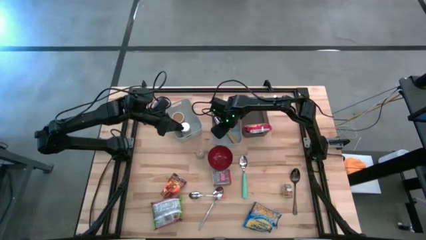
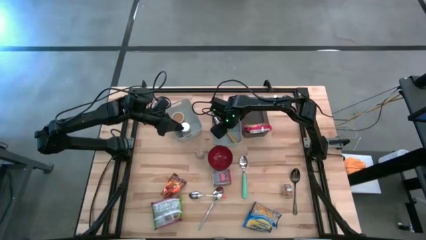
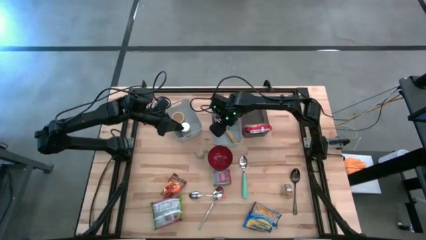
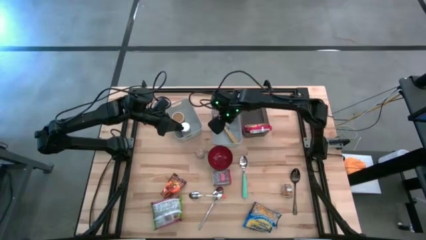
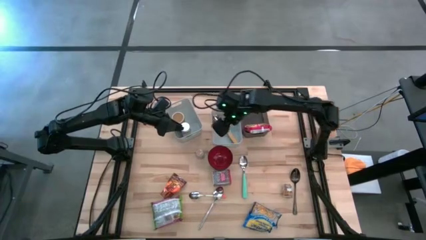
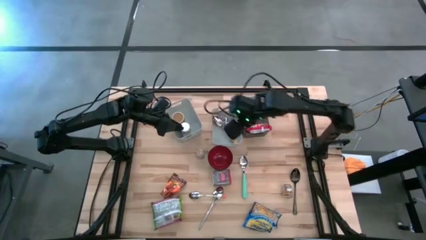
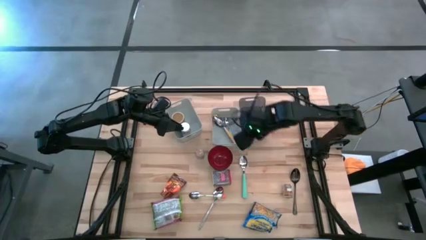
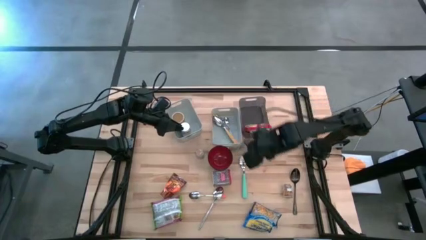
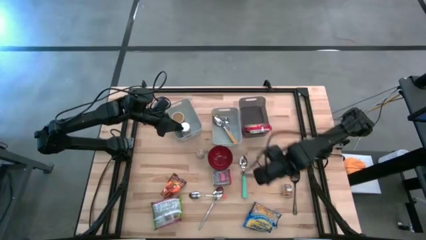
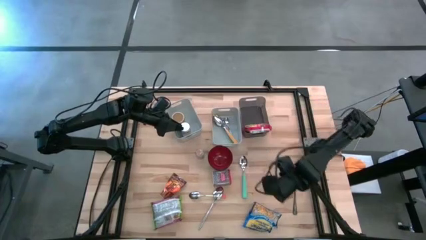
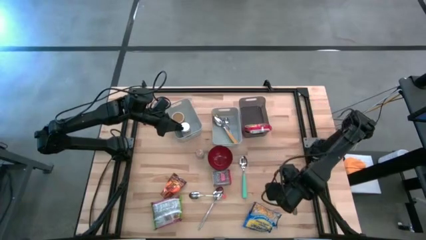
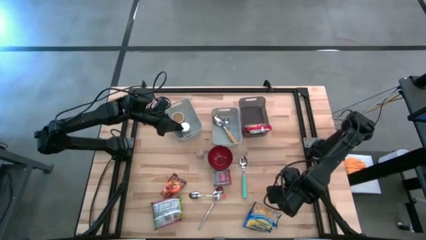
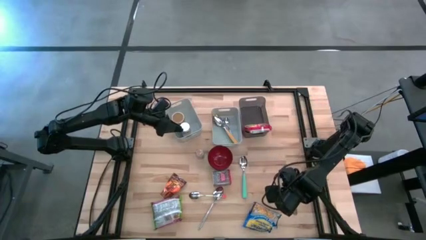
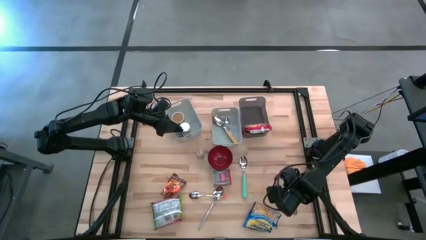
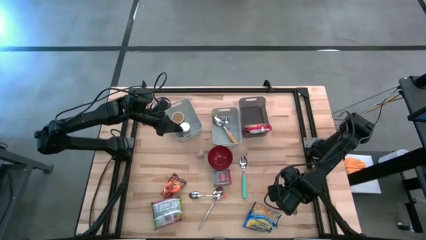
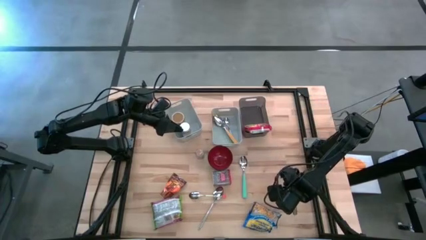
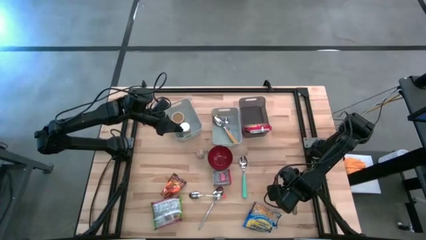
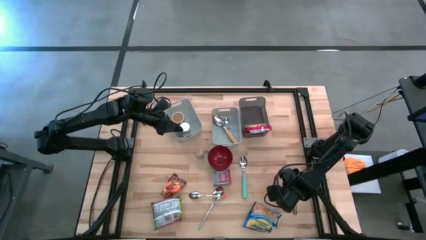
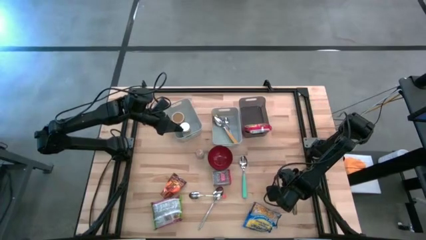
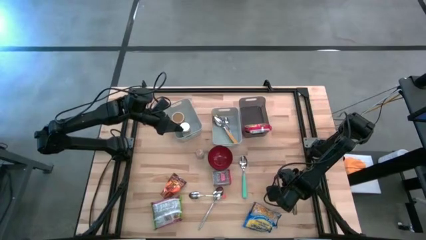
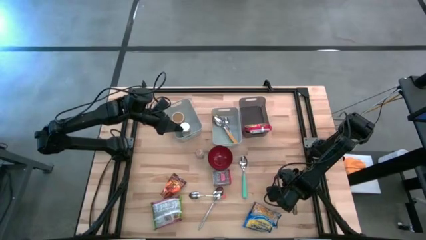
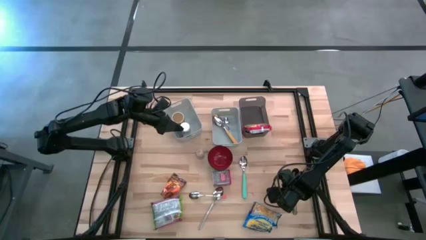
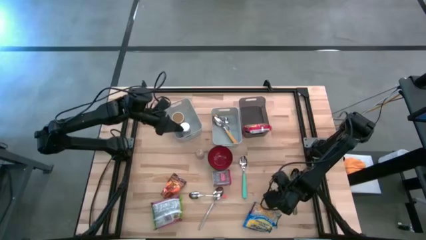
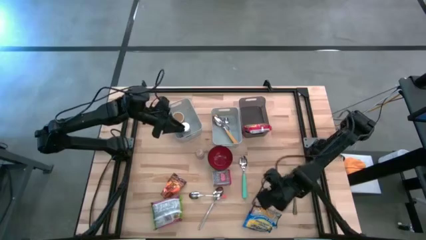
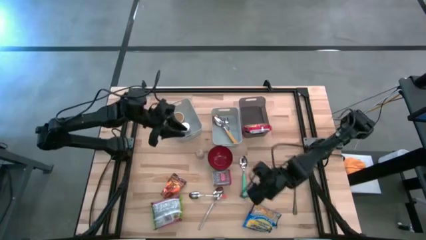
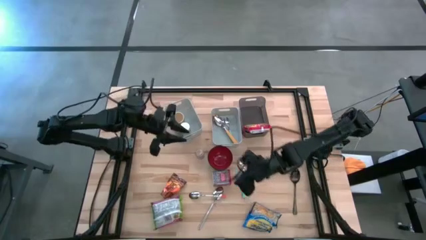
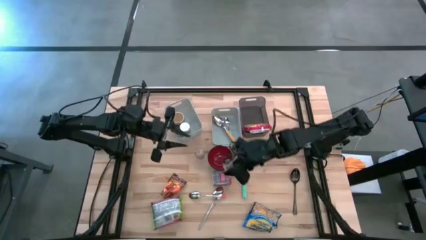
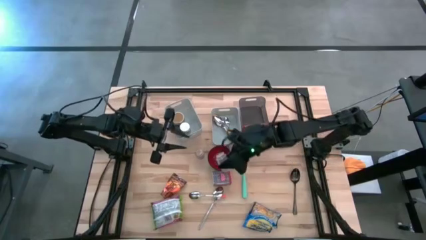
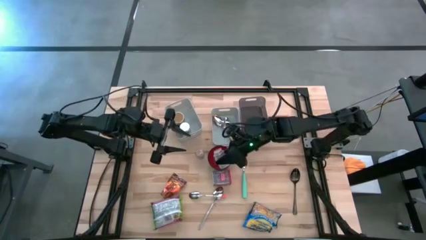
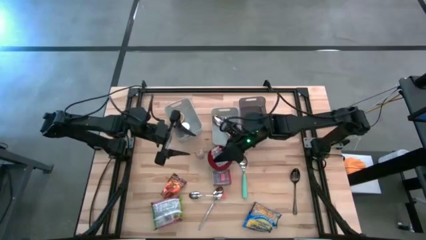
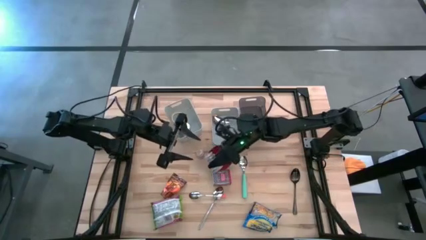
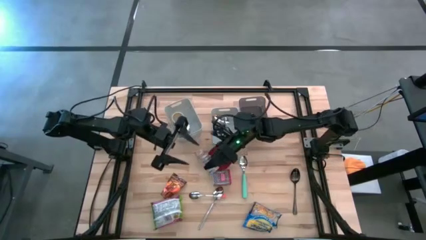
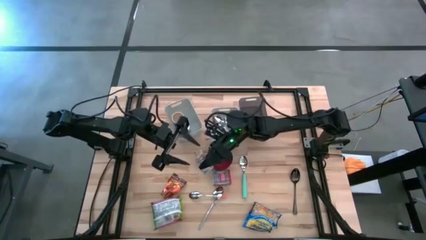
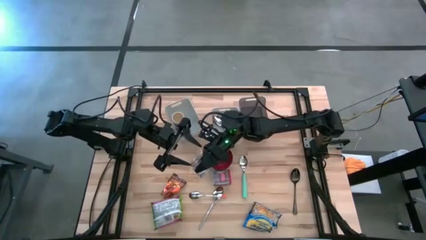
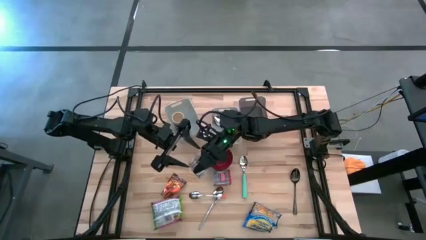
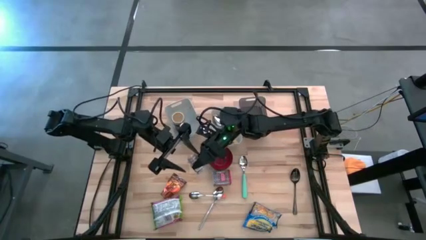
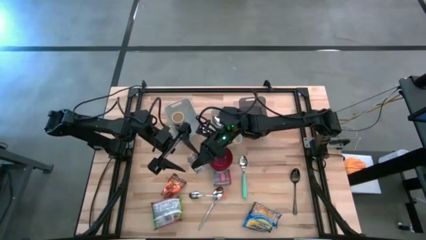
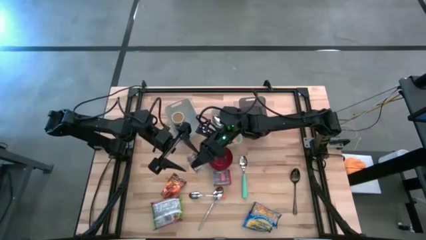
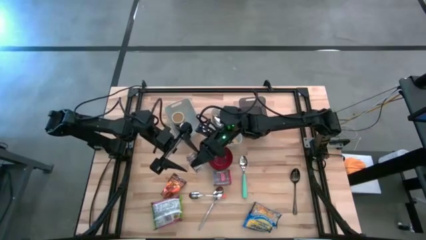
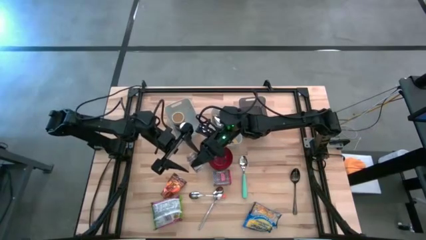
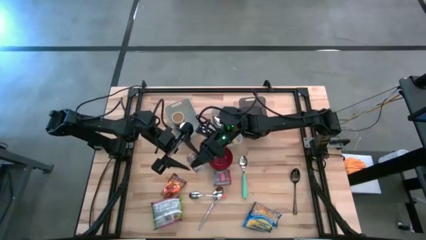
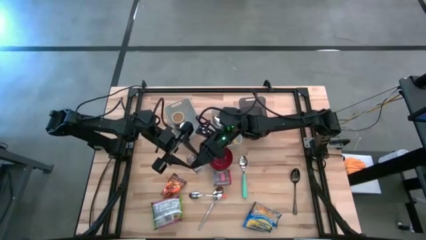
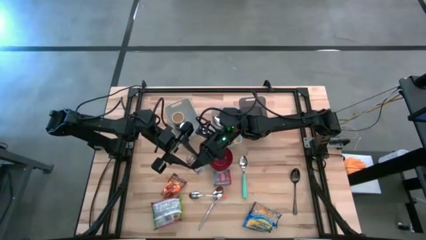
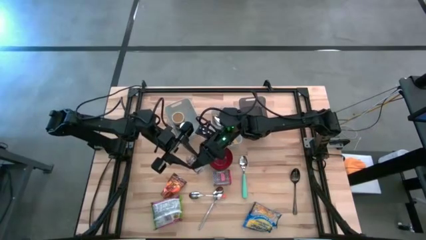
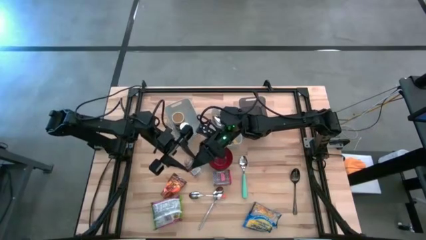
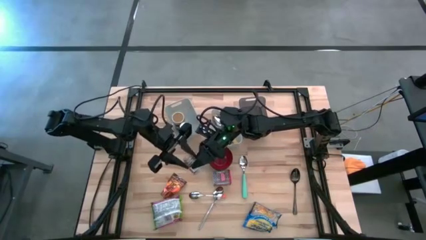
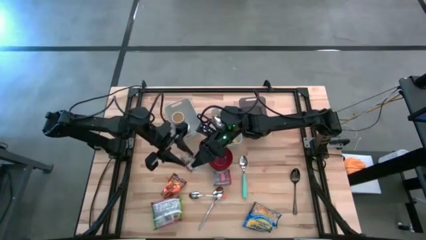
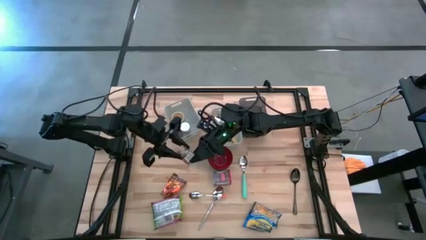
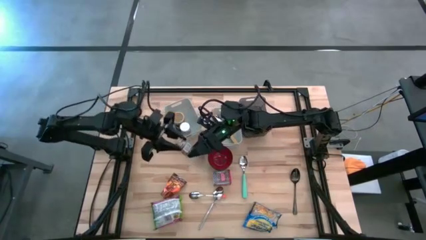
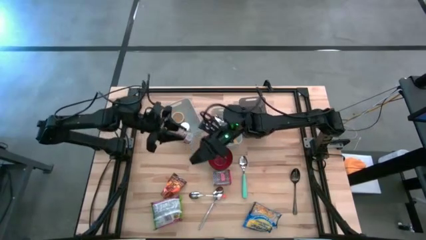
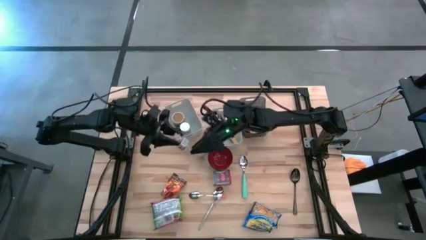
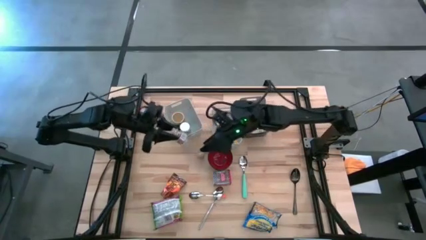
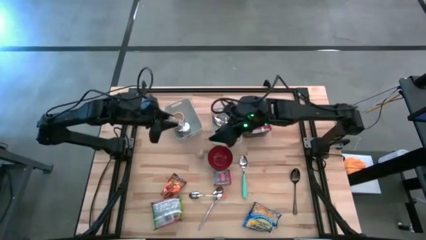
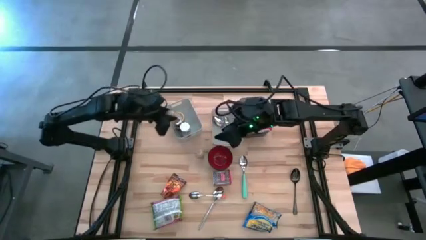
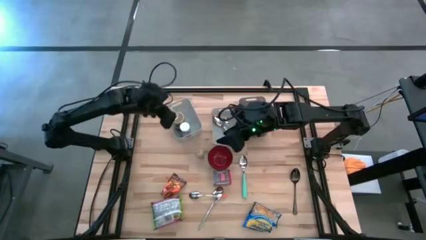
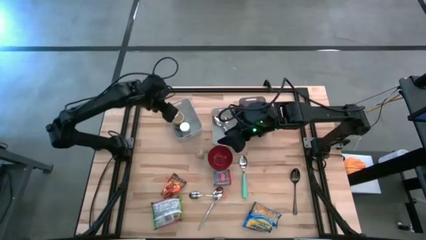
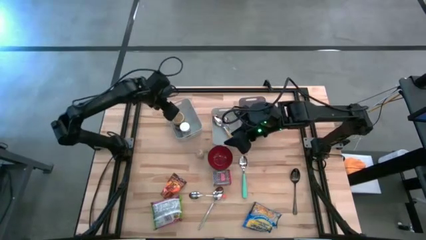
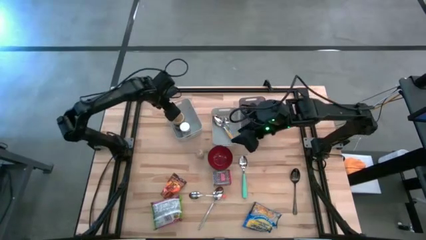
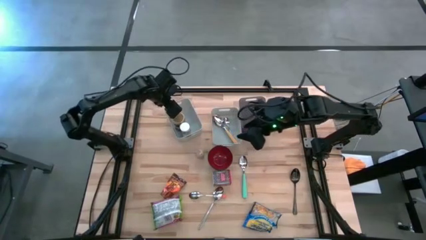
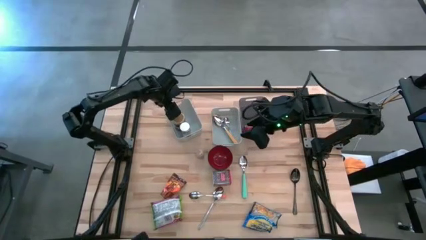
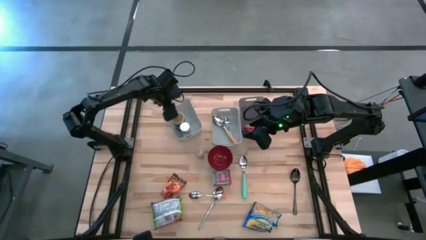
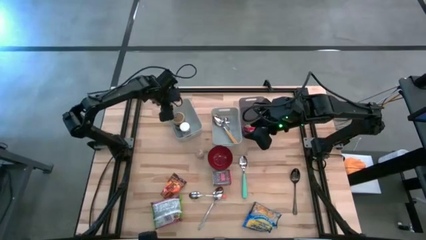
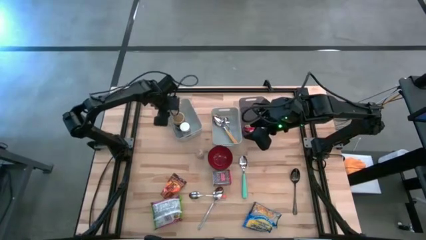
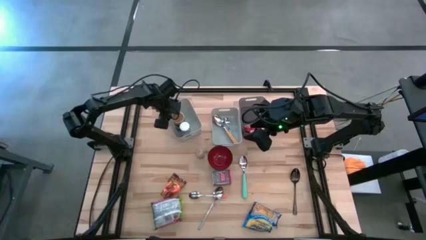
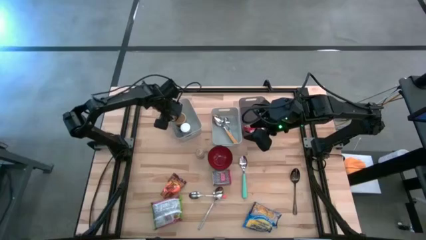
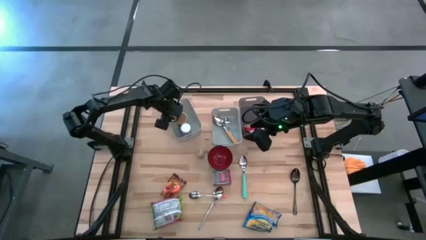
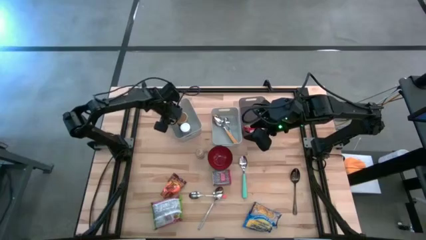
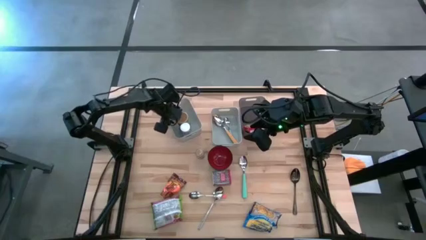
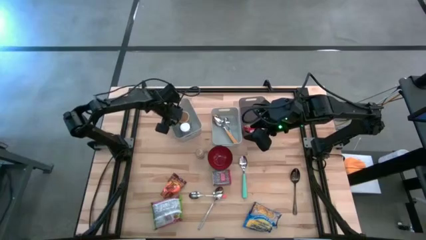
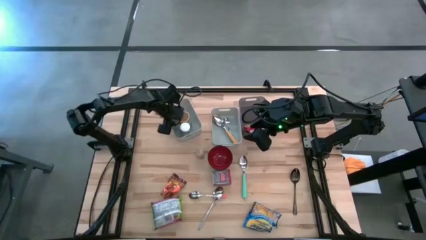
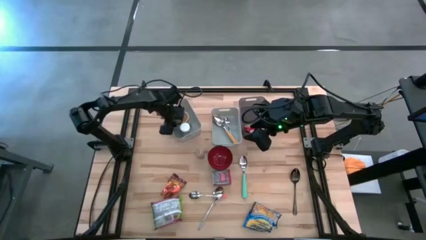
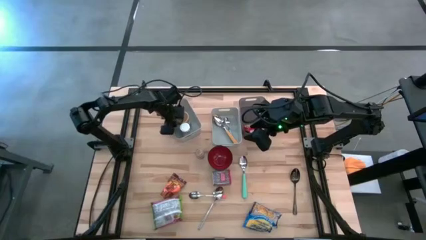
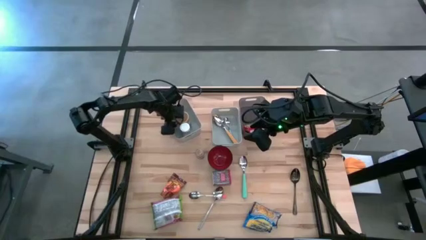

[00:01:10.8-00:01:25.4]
Put the brown seasoning bottle into the left white bin

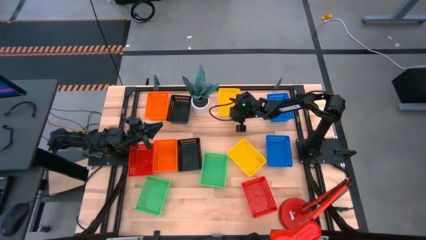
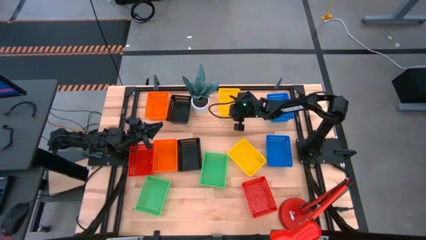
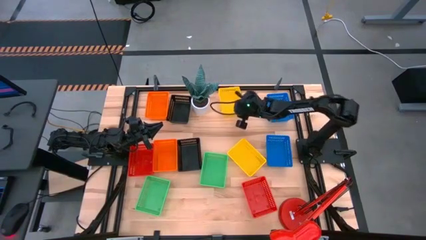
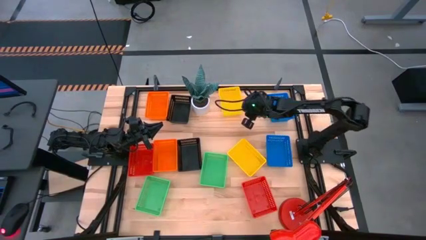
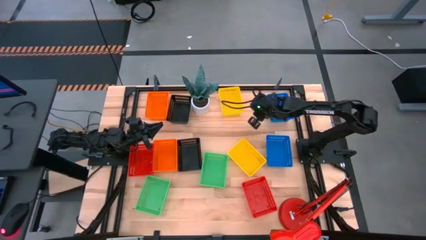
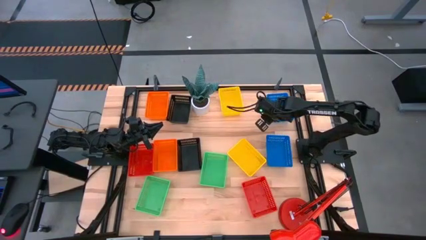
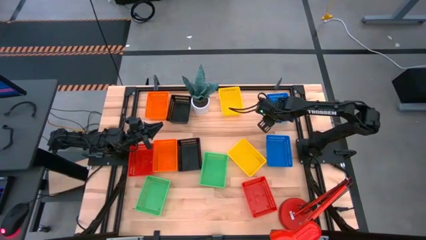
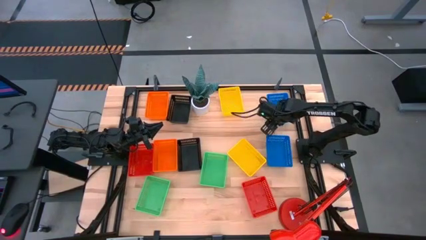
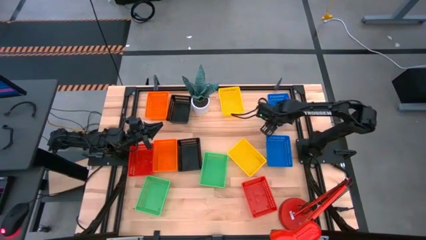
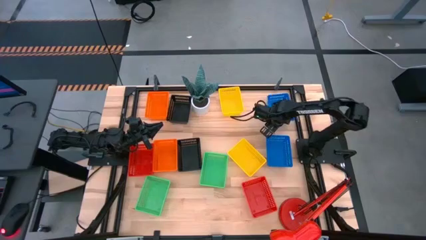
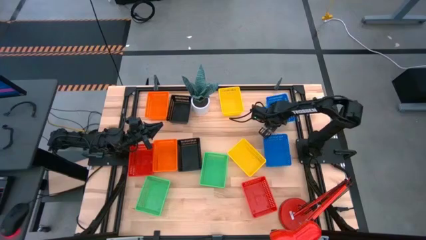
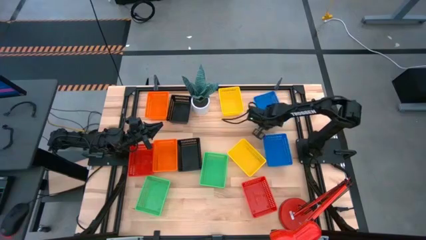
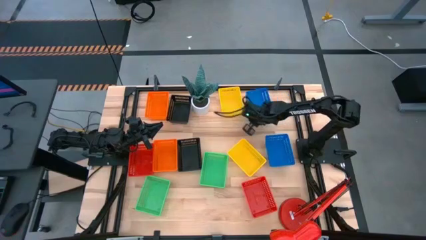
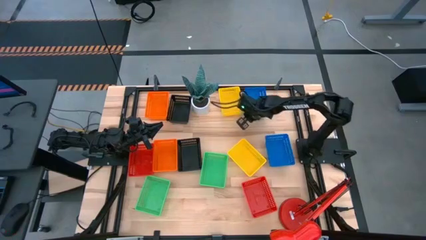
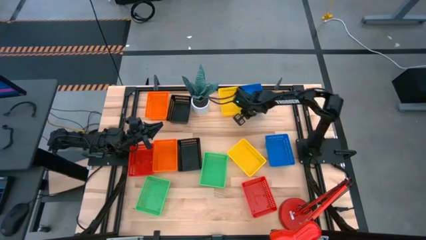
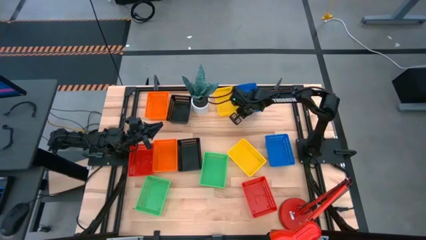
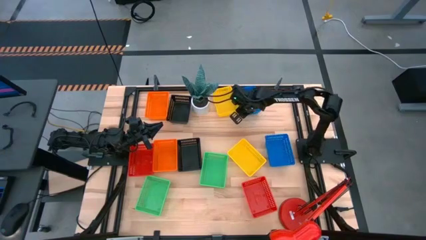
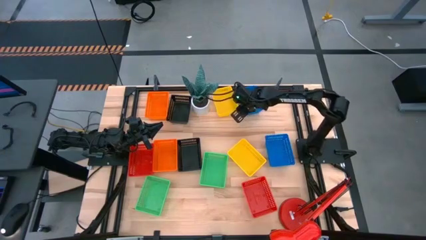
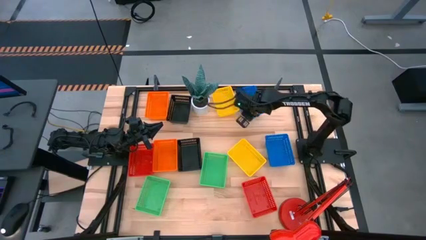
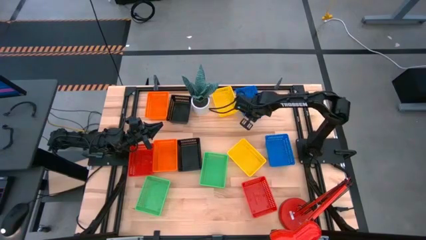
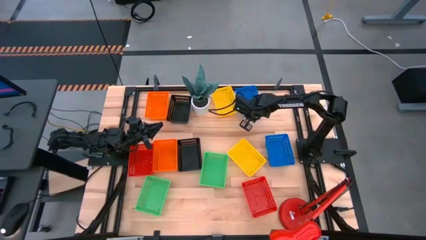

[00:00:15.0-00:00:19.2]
Move the top blue bin to the top center of the table
